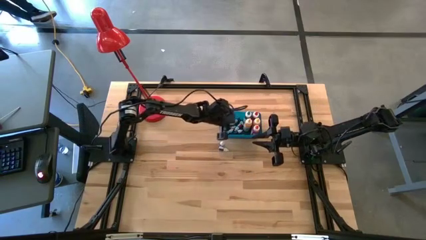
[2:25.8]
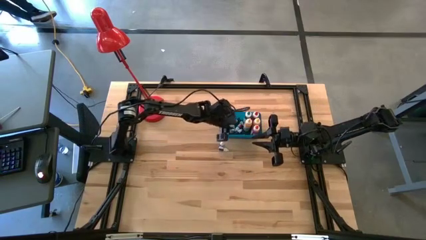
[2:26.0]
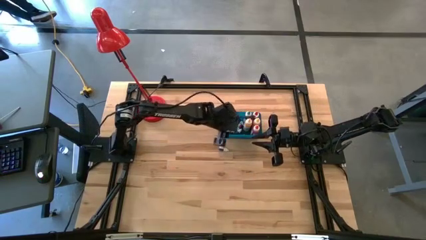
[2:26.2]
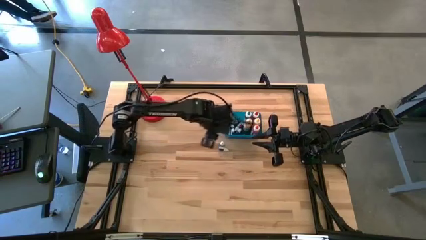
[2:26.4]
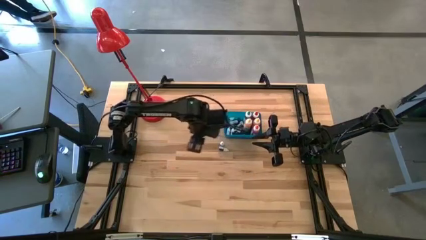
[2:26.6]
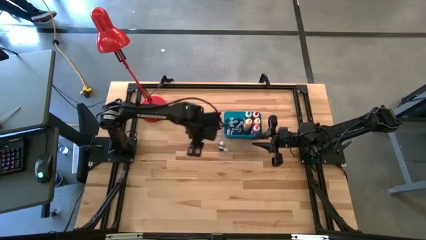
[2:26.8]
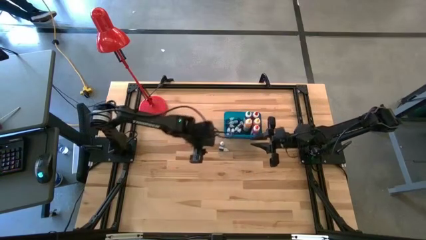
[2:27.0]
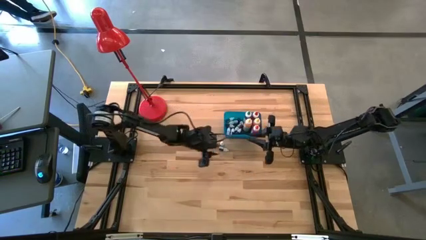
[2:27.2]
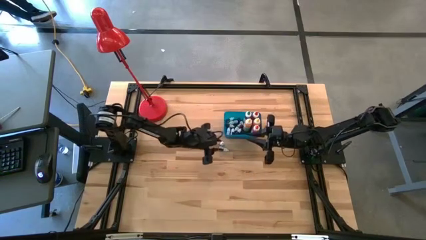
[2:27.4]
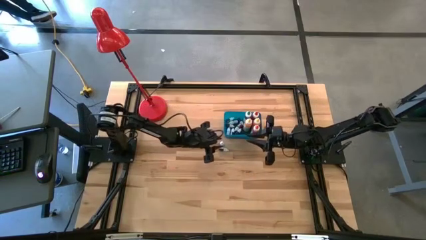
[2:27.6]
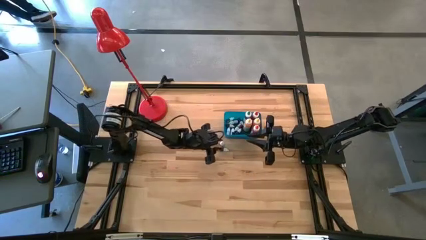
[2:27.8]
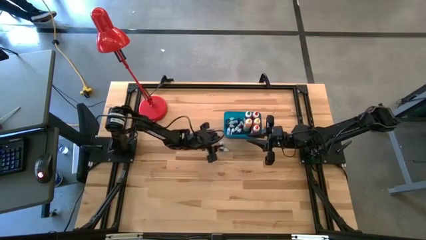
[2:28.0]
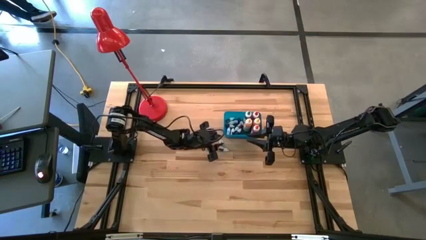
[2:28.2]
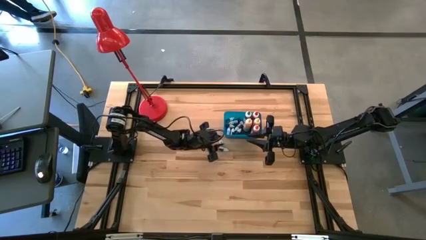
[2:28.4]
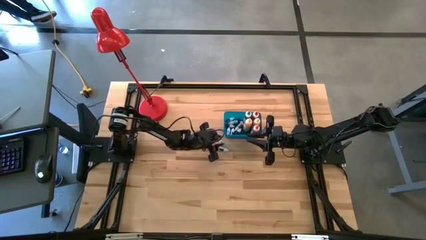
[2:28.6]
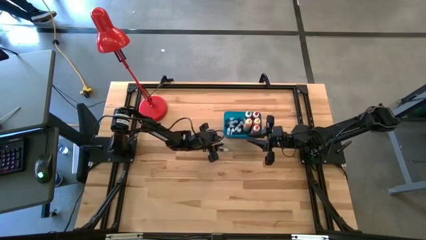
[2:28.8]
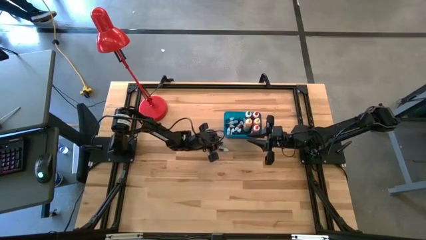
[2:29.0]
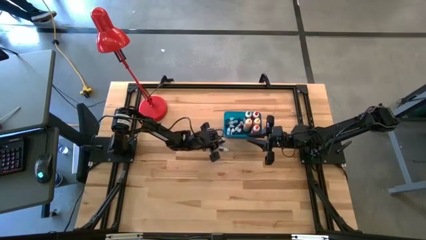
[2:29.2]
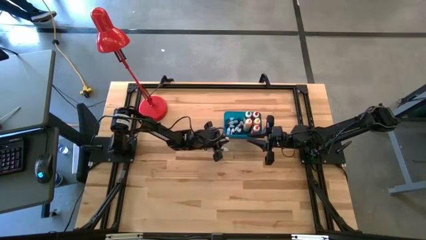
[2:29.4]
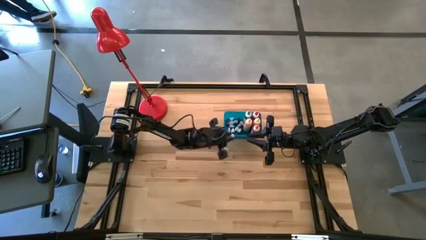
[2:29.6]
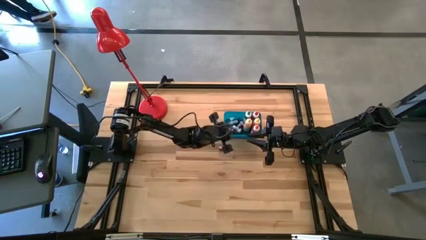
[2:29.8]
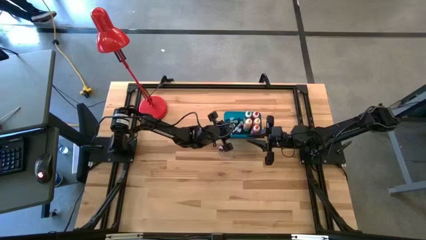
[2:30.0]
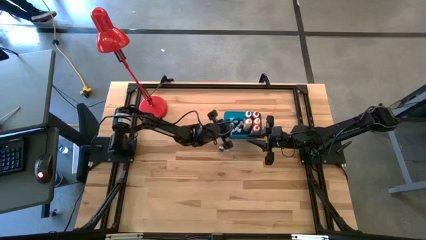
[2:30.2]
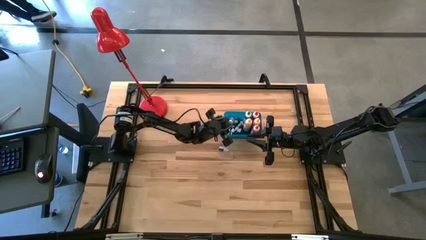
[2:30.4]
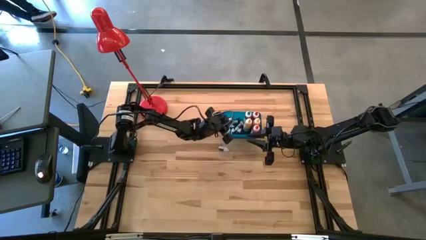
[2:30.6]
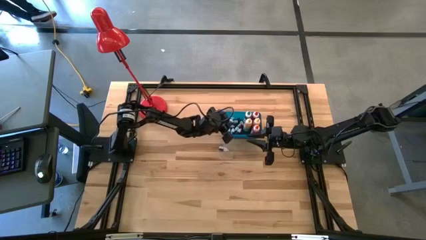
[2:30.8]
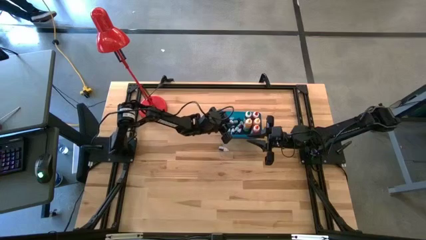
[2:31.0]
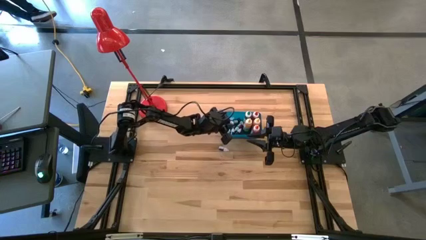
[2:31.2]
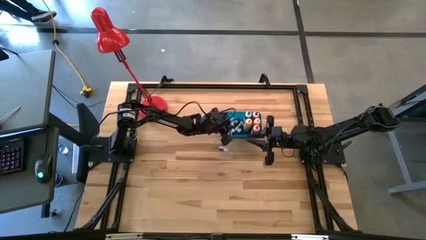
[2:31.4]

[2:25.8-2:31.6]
Task: Pick & Place food coloring
Put the small black food coloring bottle into the blue bin

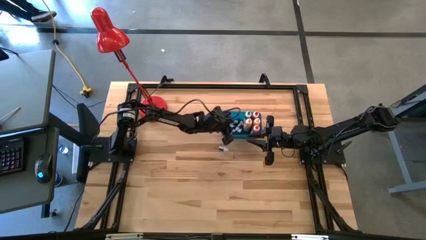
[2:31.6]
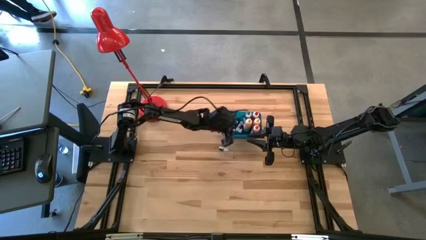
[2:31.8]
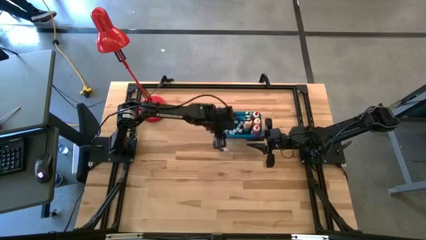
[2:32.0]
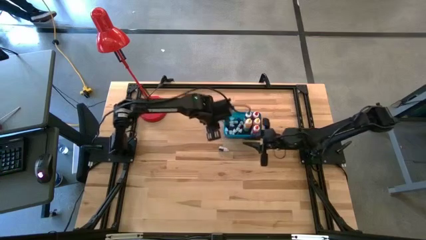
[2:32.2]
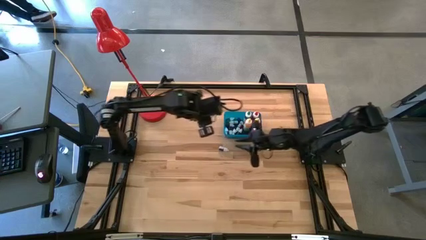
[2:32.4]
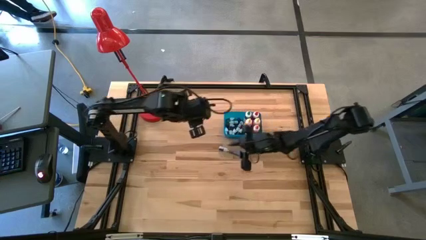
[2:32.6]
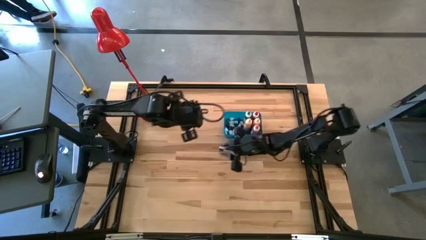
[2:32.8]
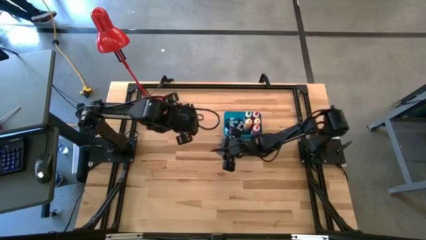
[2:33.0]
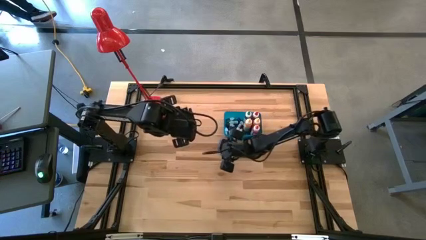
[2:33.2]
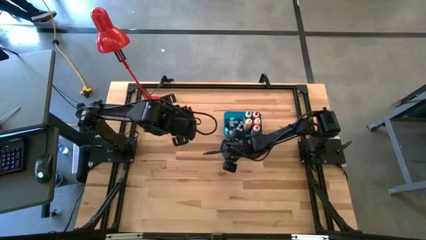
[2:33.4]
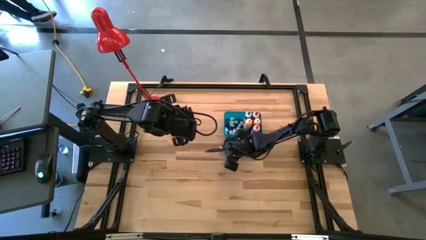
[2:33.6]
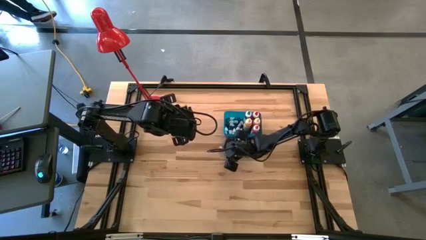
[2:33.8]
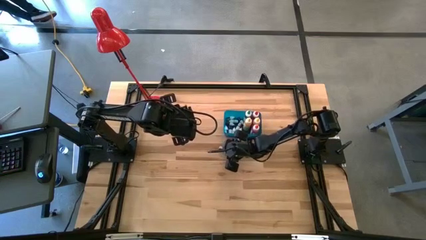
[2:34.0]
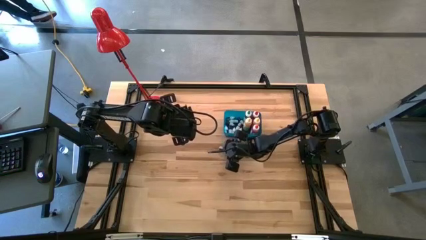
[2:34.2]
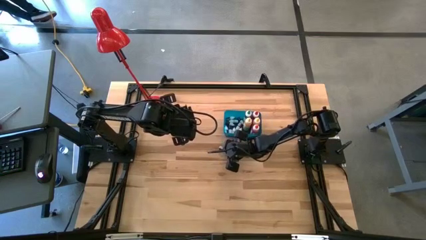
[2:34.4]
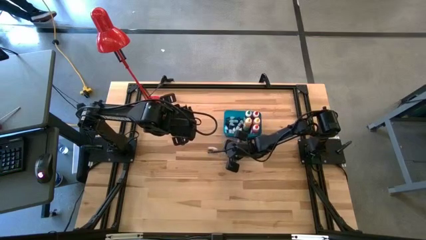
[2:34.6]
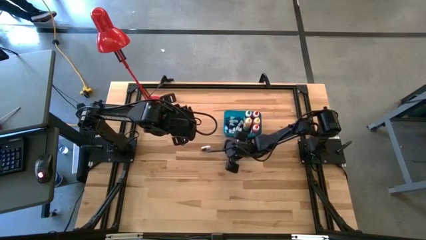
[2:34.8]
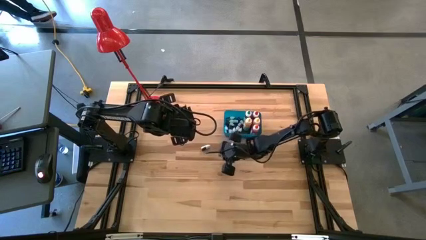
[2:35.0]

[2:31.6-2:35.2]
Put the small white food coloring bottle into the blue bin

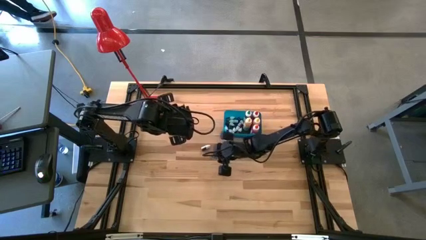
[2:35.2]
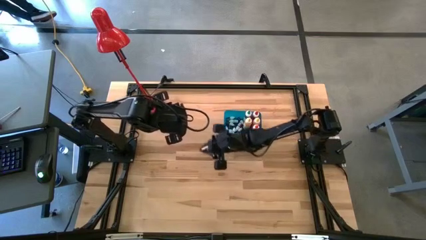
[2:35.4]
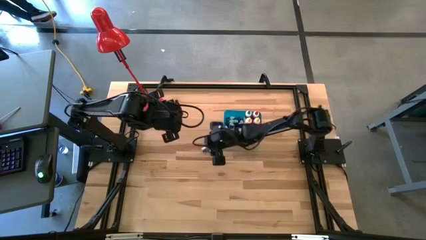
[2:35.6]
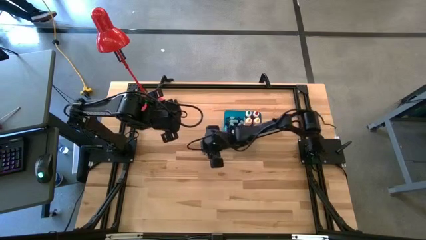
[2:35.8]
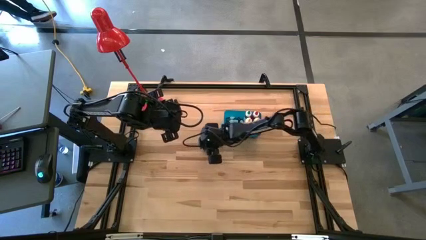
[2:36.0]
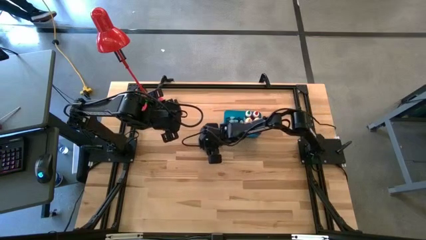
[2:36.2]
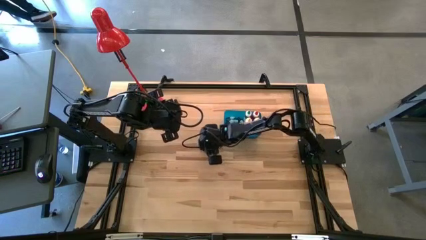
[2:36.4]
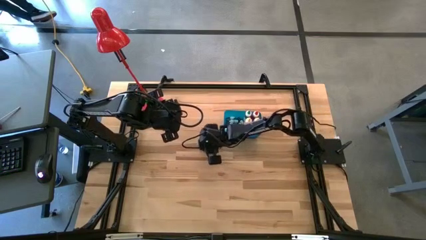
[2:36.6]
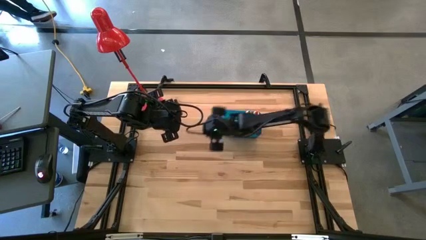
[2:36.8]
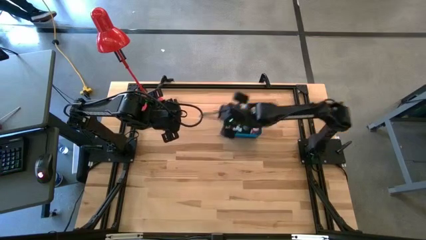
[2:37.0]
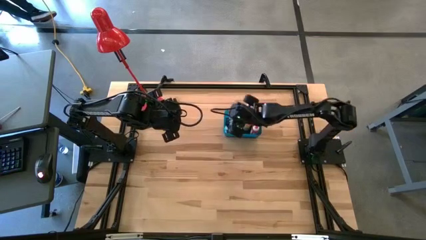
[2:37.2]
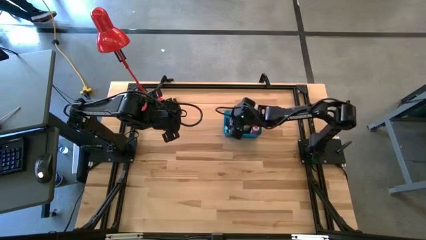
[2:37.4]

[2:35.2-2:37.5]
Put the small white food coloring bottle into the blue bin

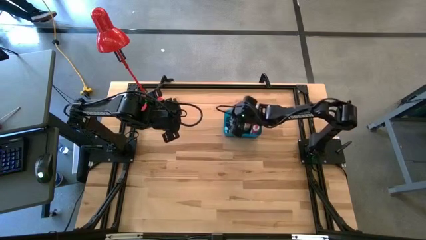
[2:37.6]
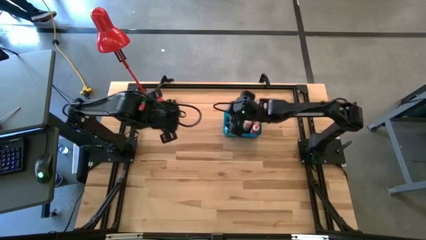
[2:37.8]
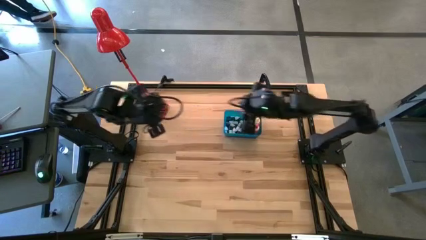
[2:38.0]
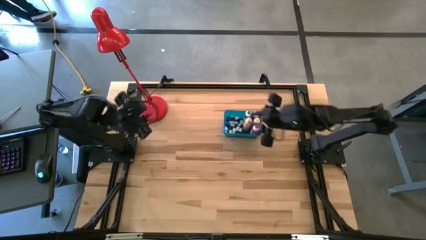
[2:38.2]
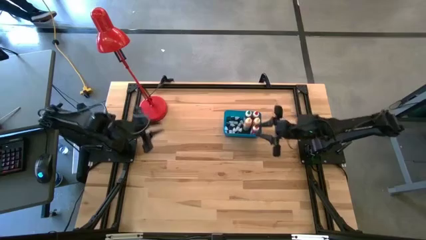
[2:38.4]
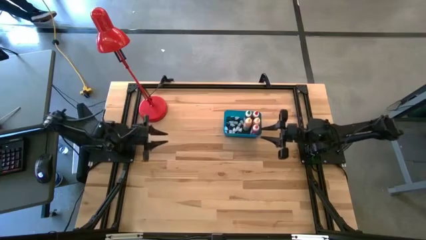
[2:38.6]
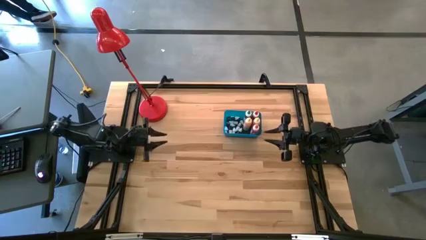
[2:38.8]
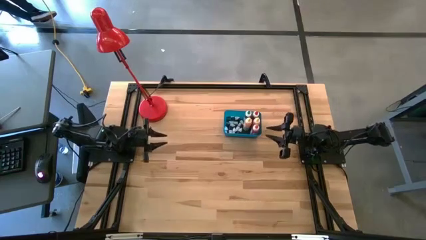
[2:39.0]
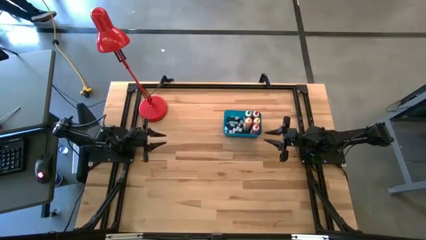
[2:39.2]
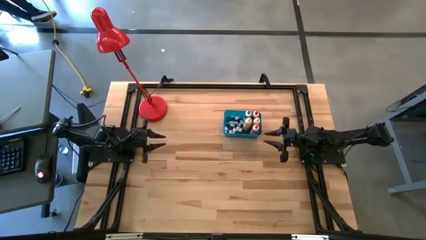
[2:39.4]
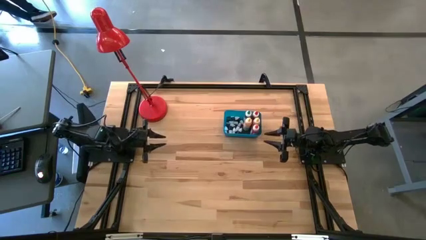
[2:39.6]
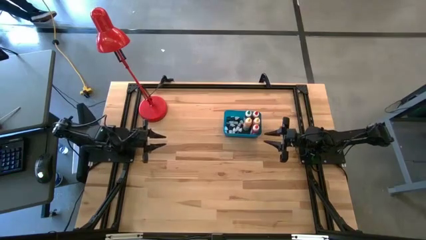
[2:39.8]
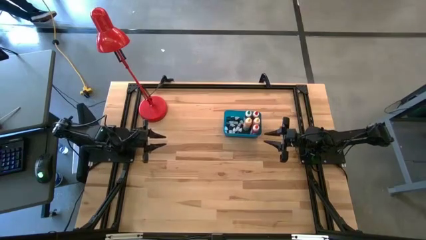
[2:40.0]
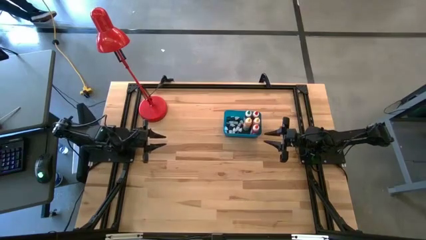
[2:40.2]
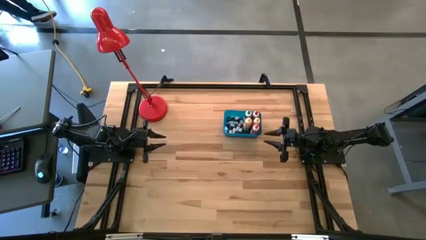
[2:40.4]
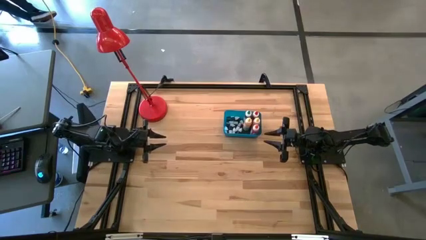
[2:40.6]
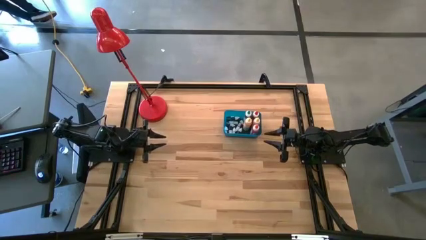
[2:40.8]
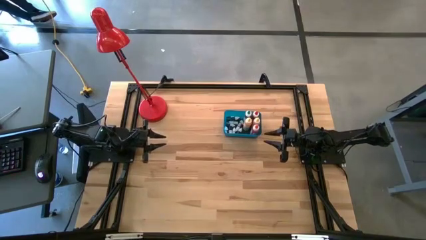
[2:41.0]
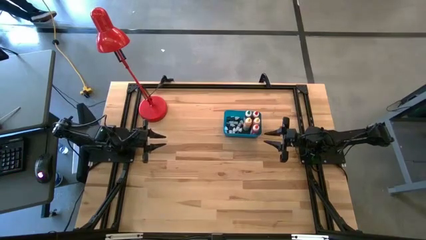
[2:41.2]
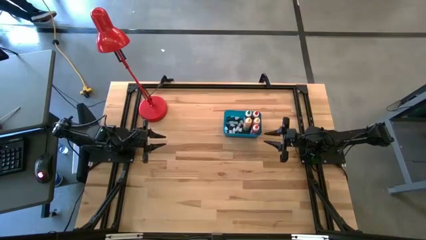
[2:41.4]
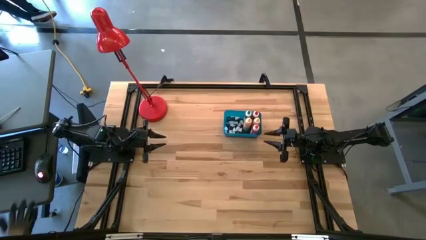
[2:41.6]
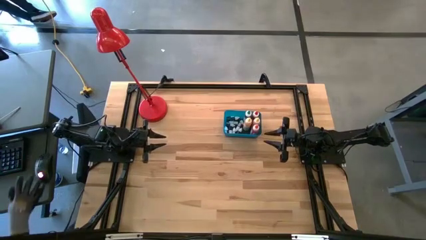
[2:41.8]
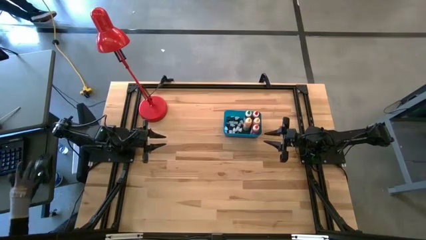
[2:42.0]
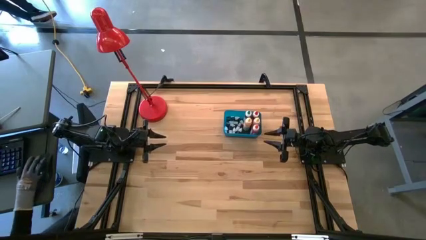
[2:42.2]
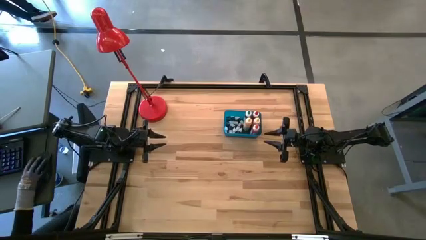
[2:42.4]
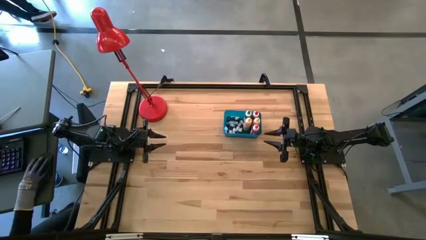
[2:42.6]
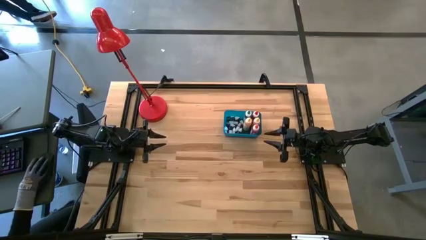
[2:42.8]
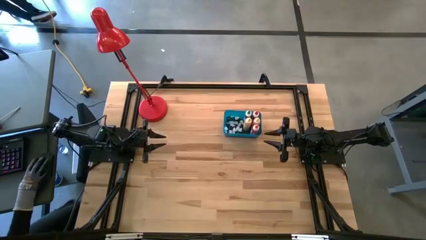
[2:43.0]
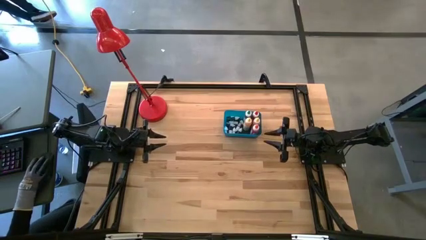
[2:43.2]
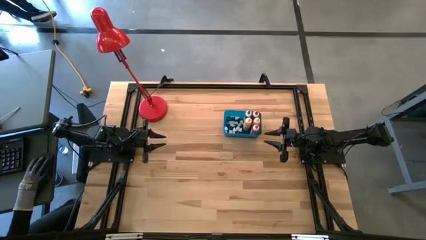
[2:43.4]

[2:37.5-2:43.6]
Return to Home Position
